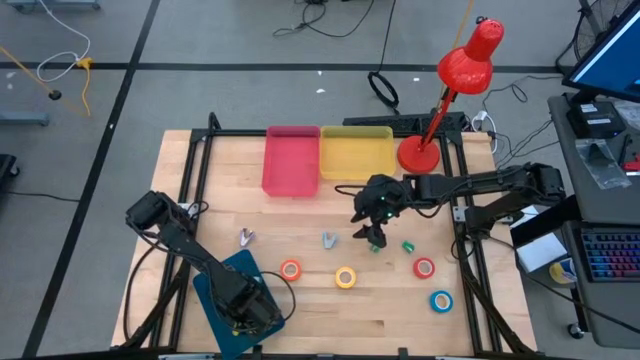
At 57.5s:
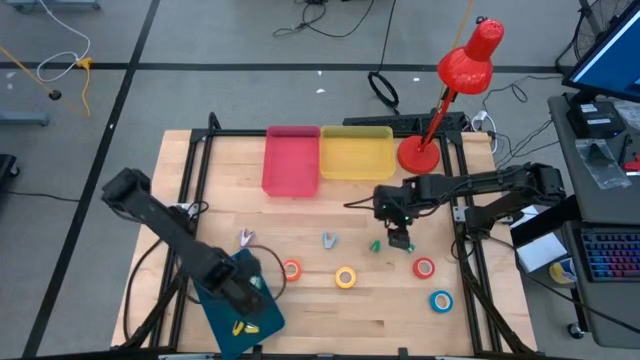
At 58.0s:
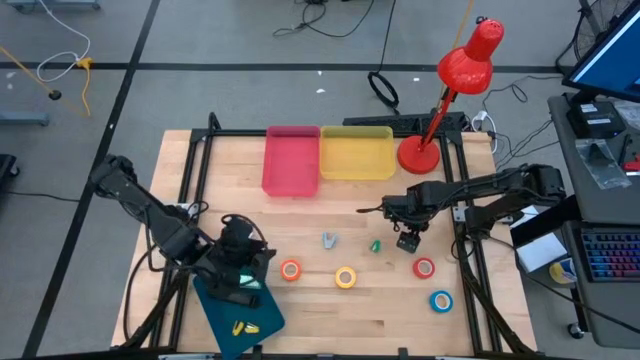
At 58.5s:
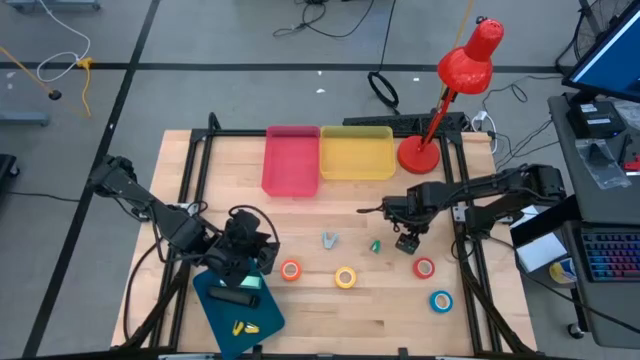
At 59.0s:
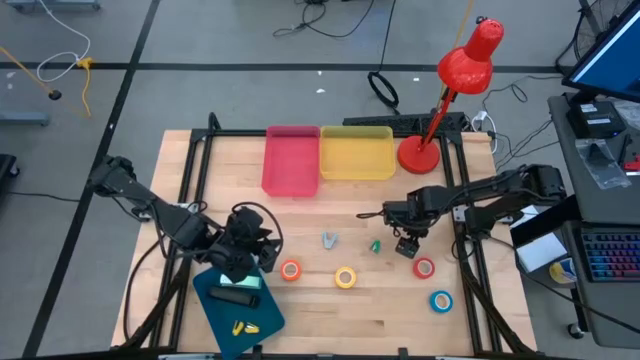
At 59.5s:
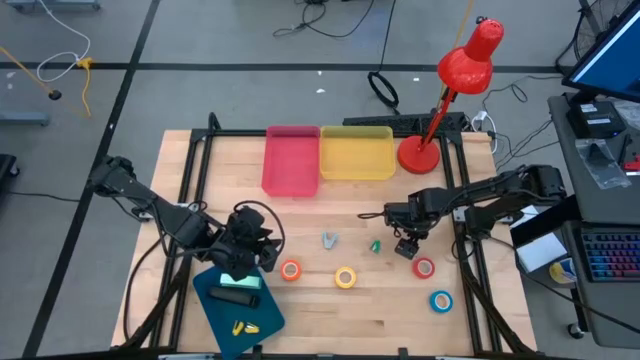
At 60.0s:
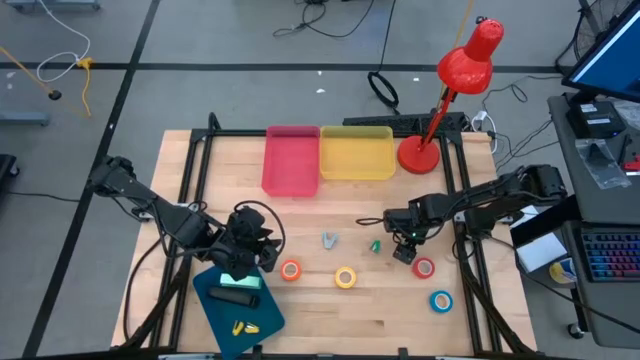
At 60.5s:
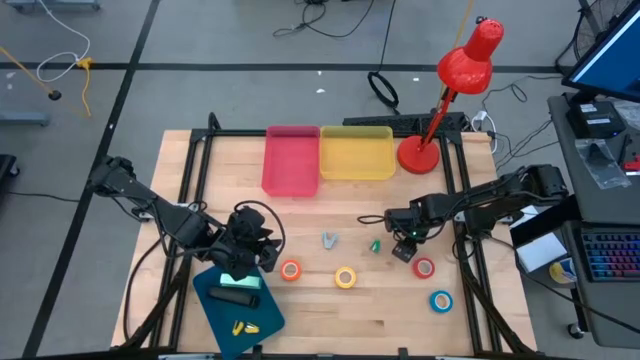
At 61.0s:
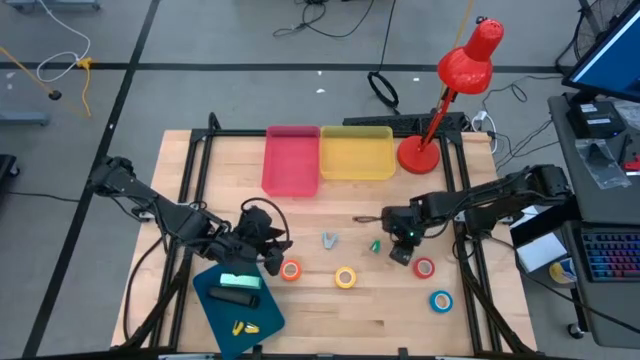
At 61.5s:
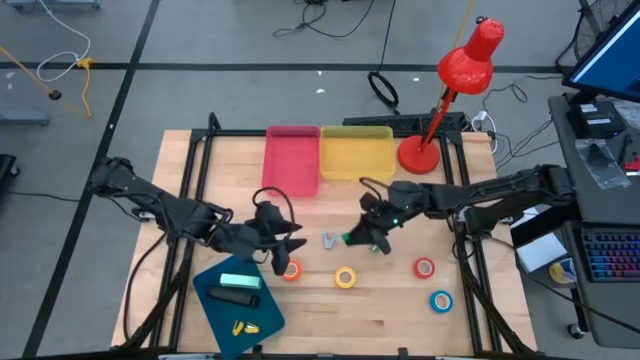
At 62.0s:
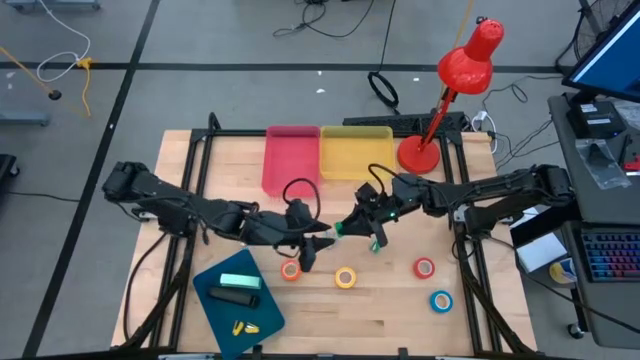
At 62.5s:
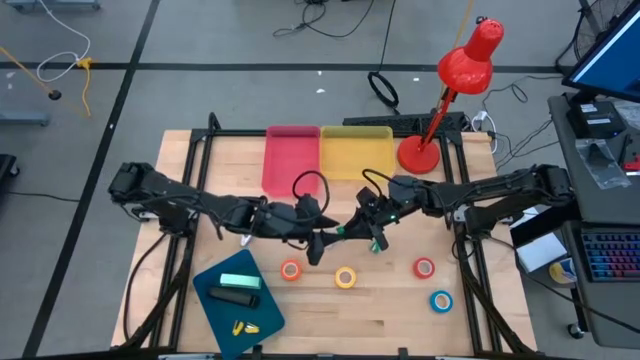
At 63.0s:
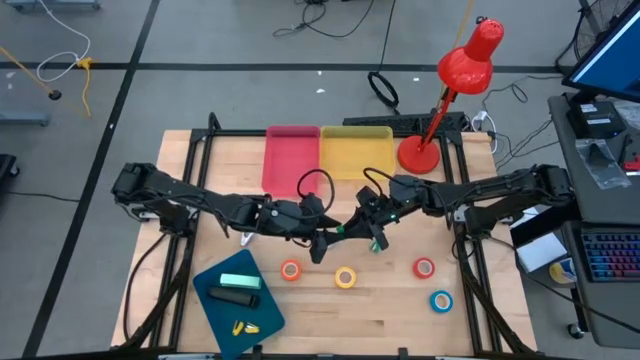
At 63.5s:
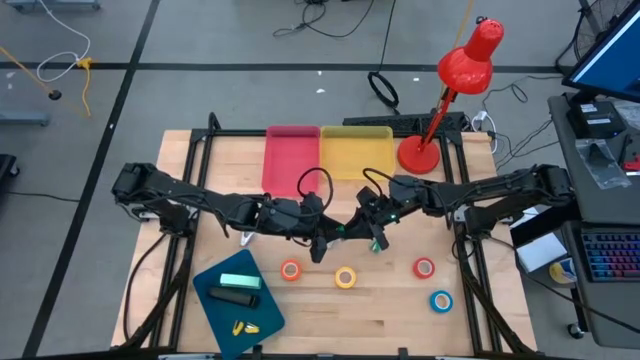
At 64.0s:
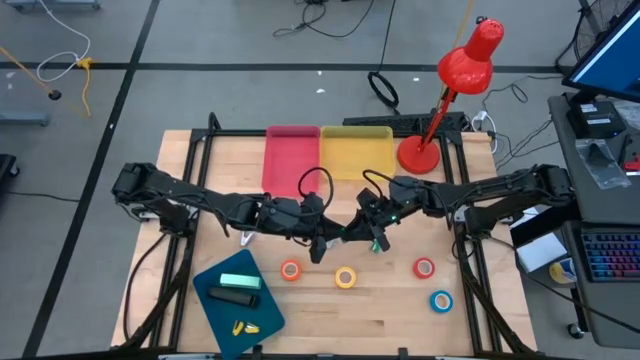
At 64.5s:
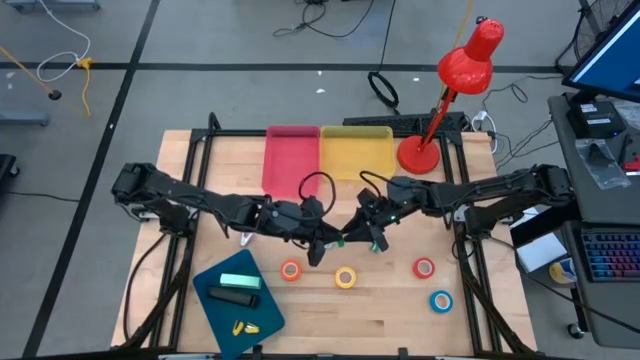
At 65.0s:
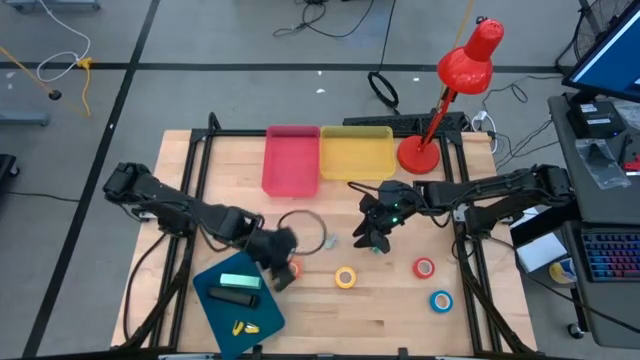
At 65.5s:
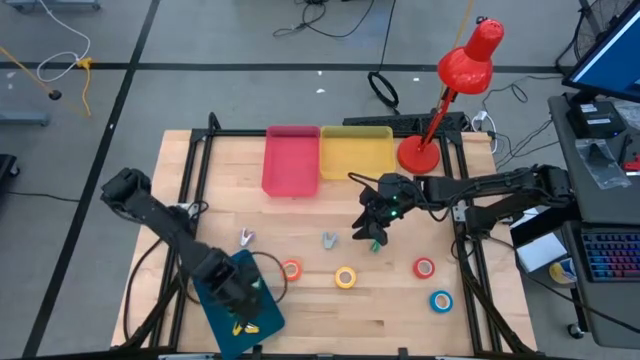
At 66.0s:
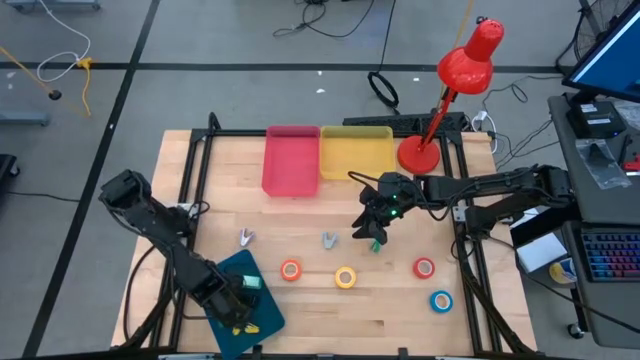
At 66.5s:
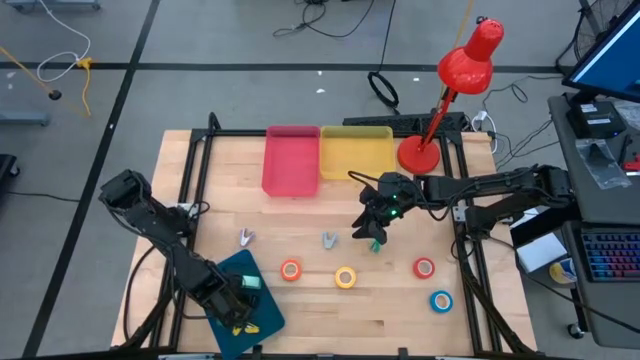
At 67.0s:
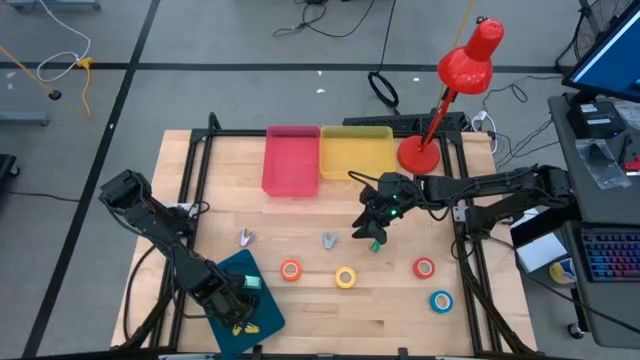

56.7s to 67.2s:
Task: Pick and place Stapler, Stapler remover, tape
Put the right green stapler into the blue bin

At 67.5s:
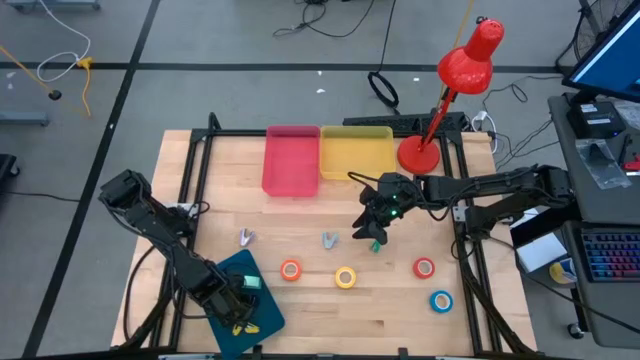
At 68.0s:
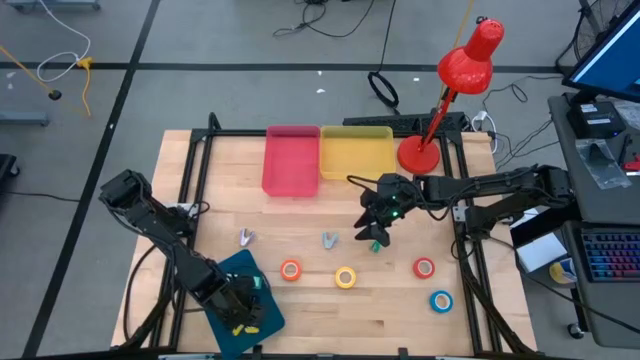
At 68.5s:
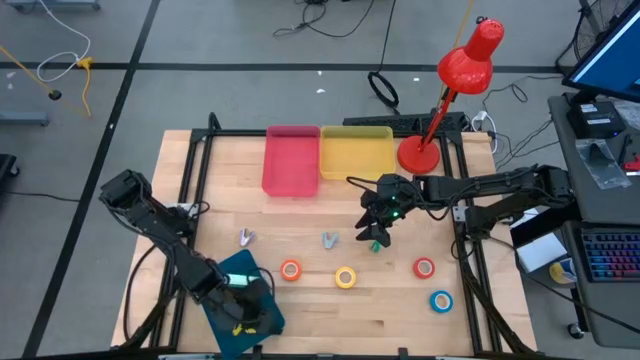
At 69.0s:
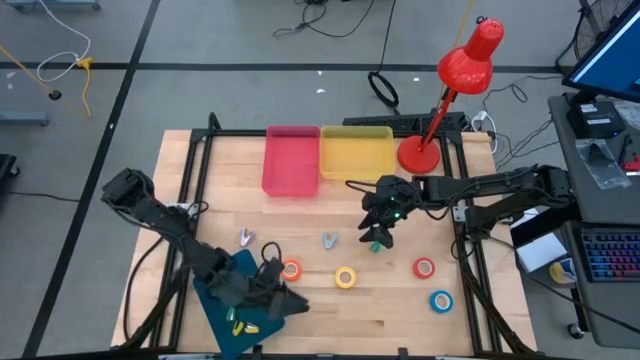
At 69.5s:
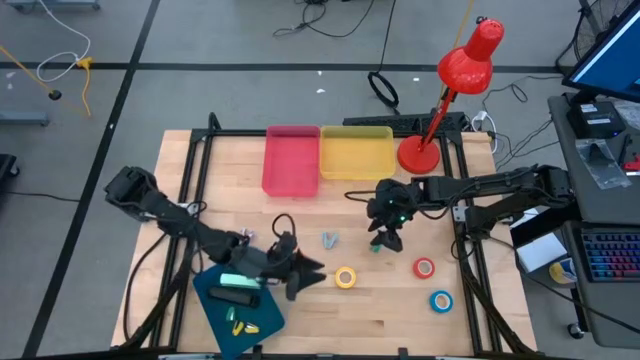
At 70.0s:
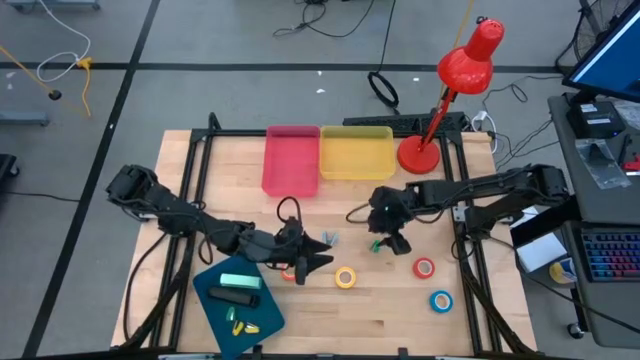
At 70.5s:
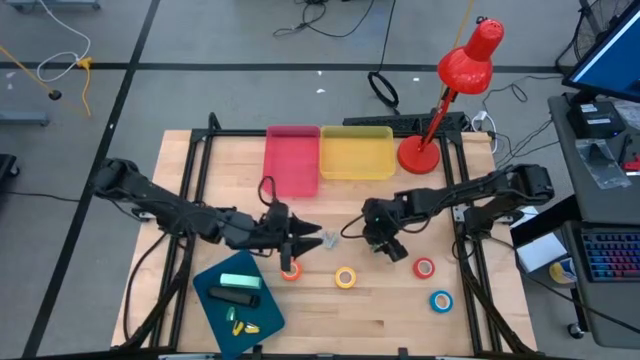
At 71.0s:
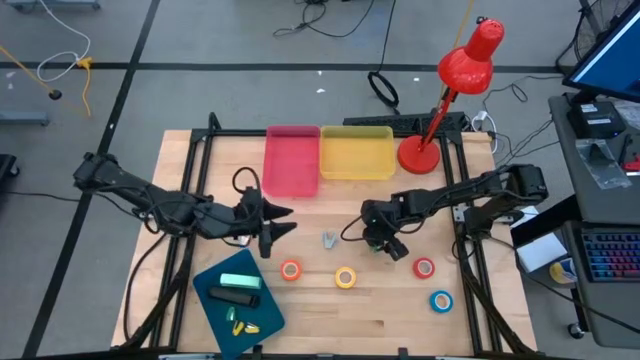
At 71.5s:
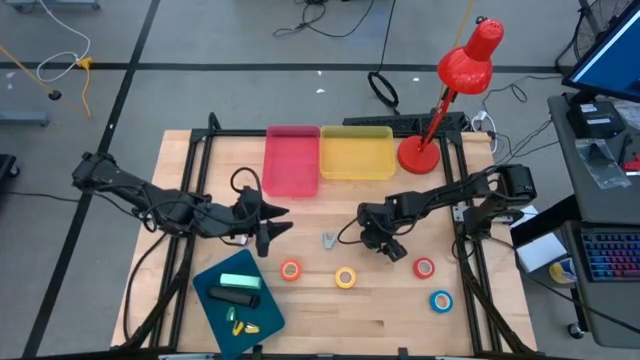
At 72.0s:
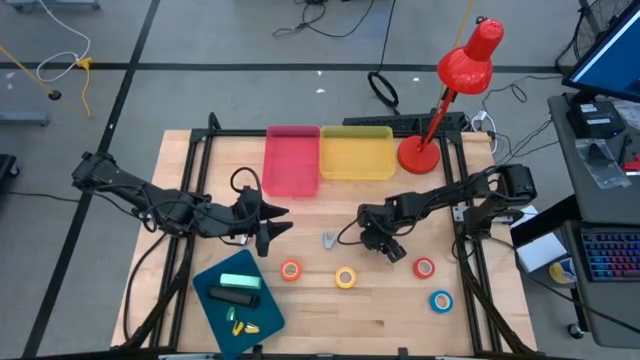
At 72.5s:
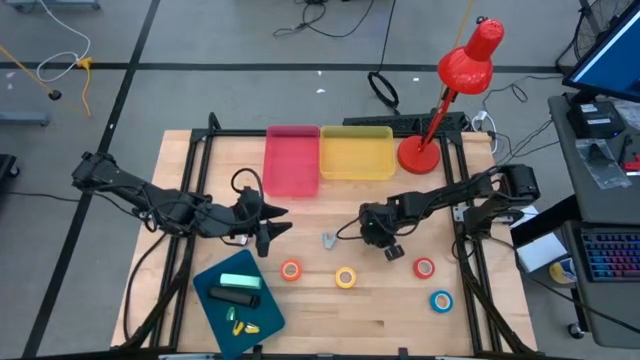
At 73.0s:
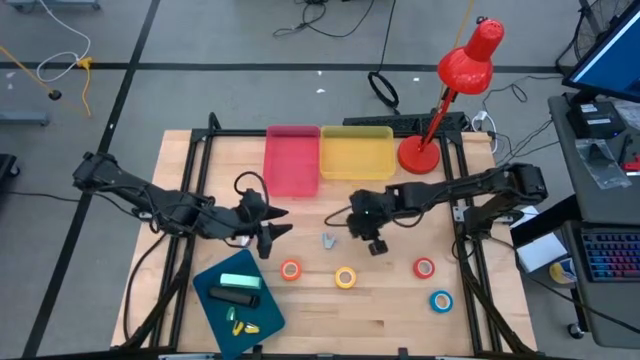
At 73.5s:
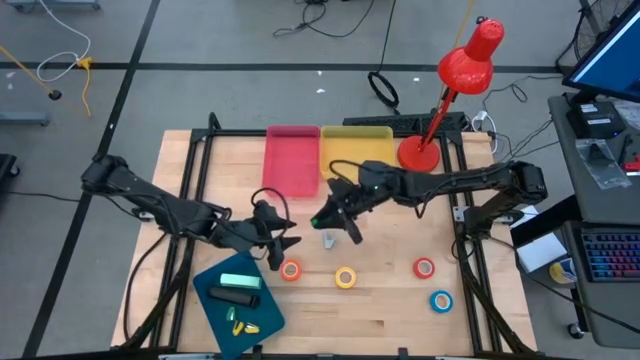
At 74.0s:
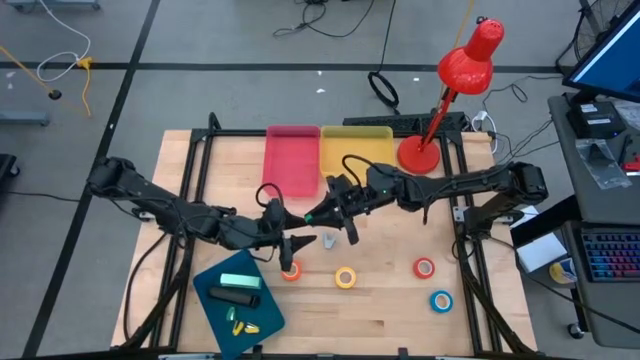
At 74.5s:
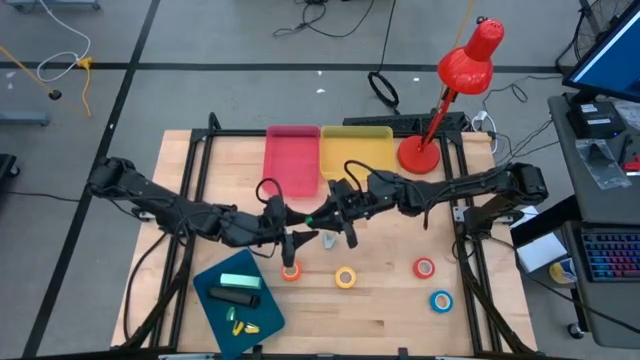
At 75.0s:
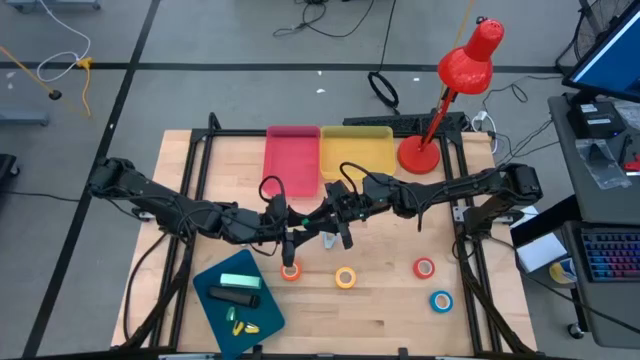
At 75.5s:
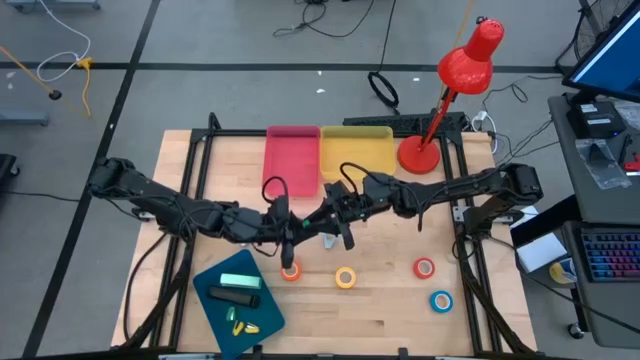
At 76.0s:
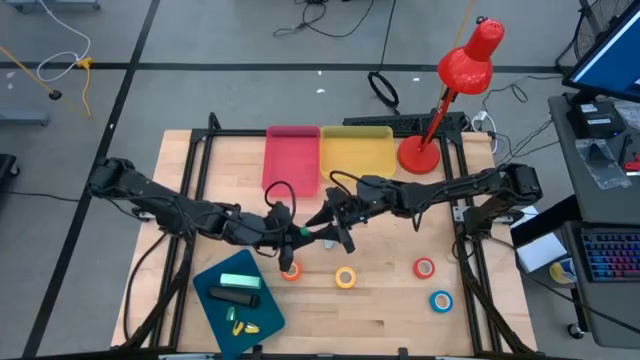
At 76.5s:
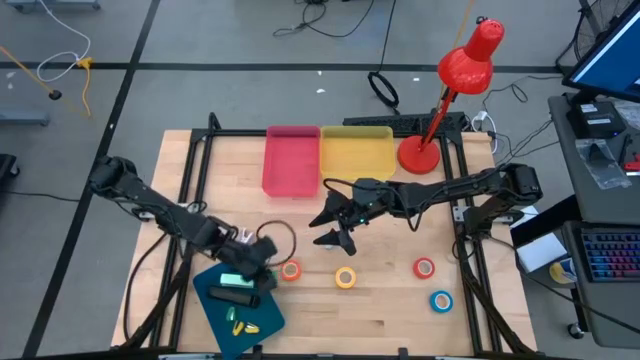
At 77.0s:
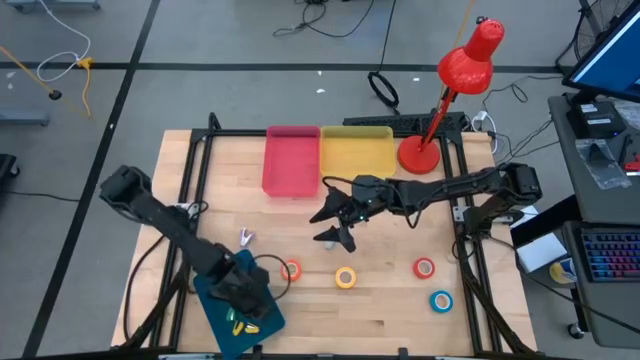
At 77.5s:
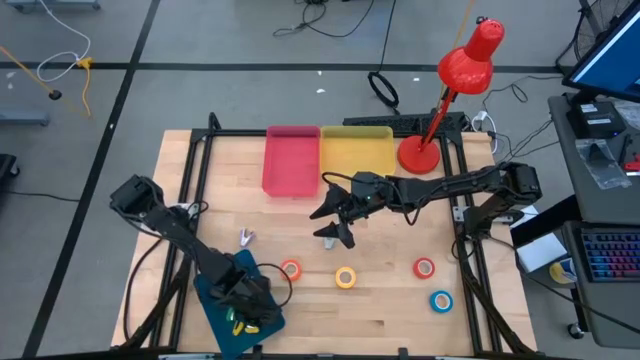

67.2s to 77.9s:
Put the green stapler into the blue bin
